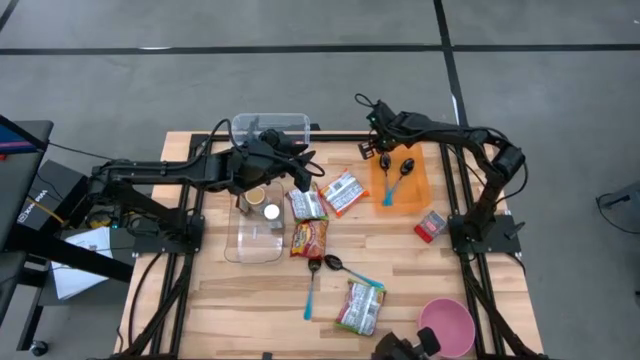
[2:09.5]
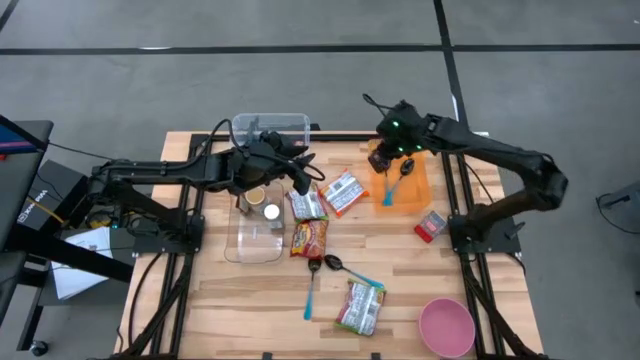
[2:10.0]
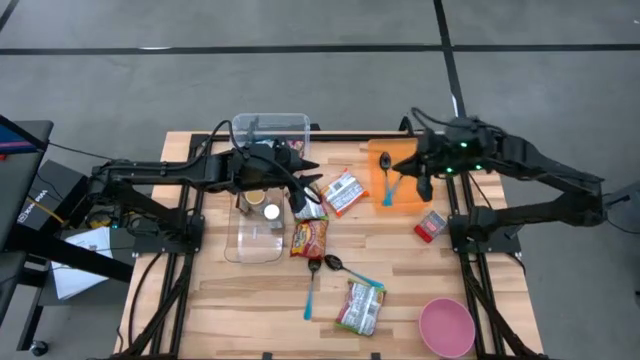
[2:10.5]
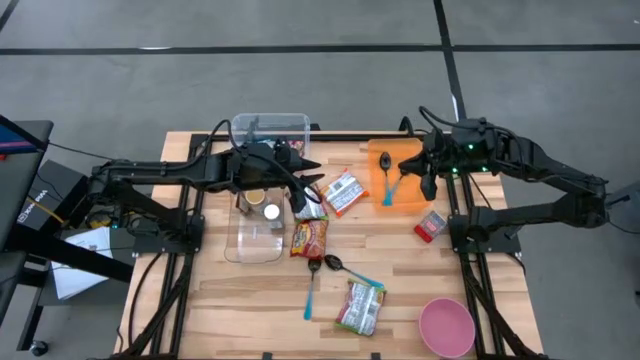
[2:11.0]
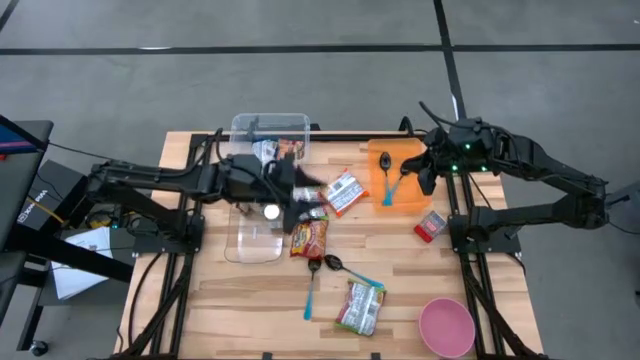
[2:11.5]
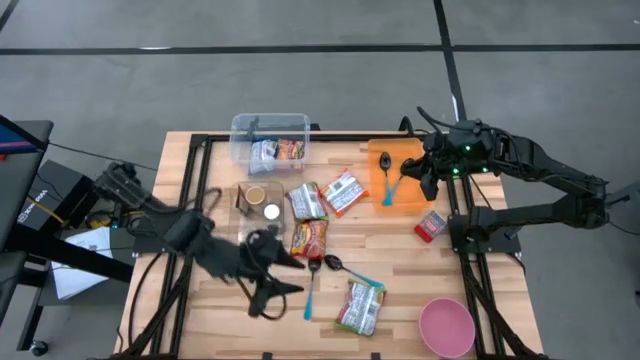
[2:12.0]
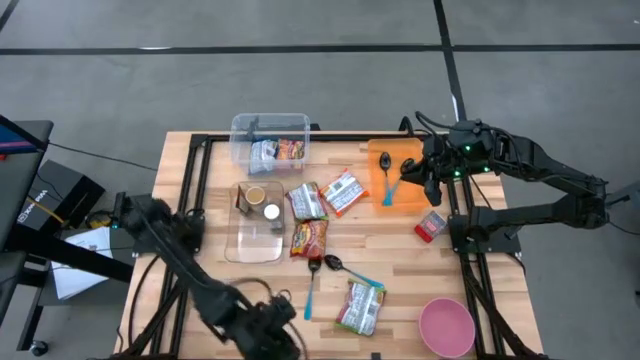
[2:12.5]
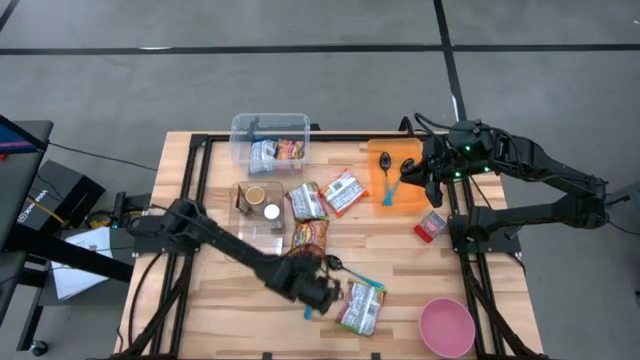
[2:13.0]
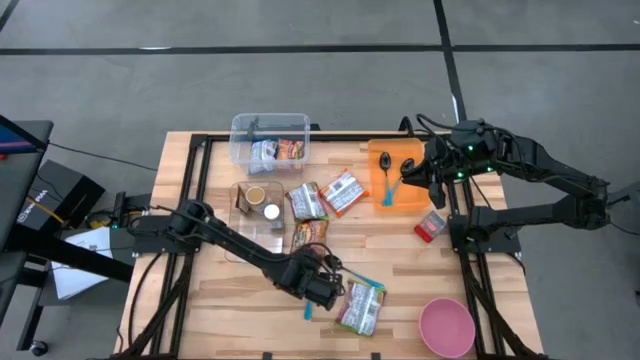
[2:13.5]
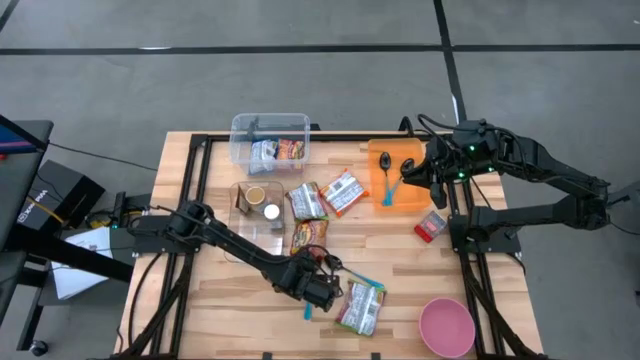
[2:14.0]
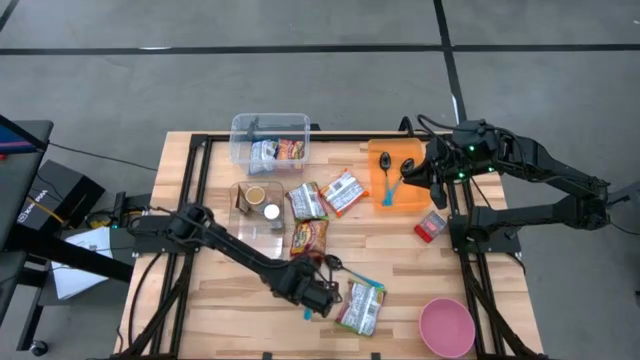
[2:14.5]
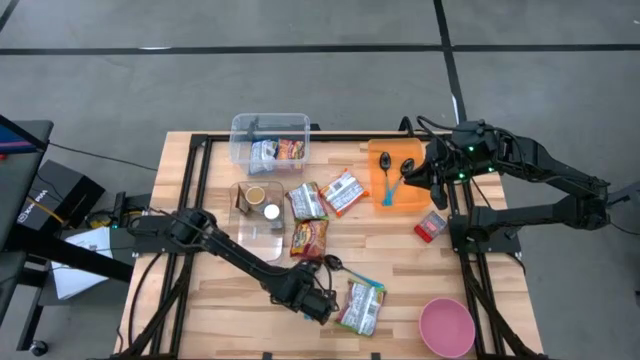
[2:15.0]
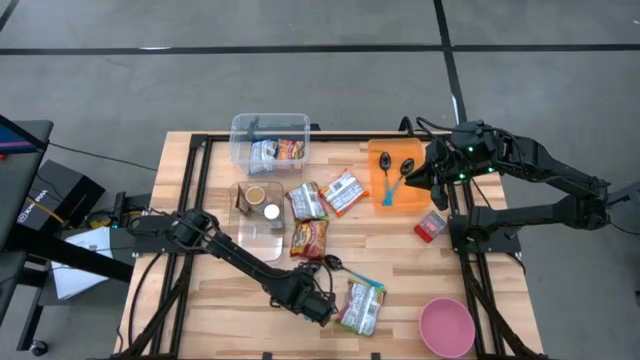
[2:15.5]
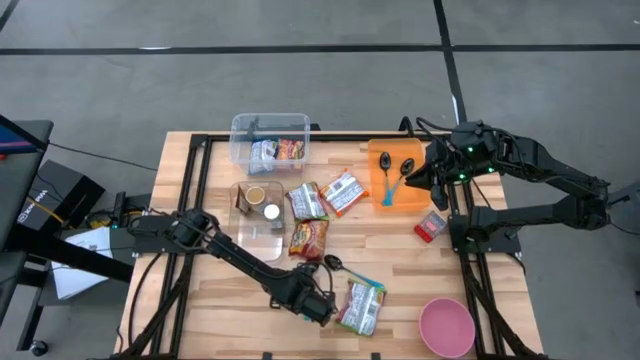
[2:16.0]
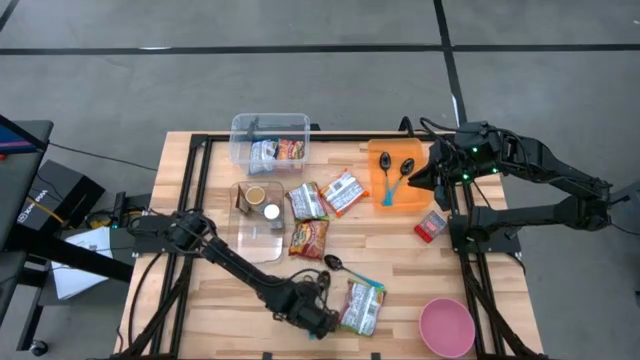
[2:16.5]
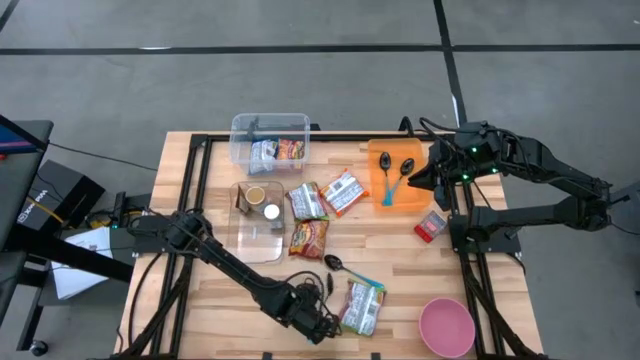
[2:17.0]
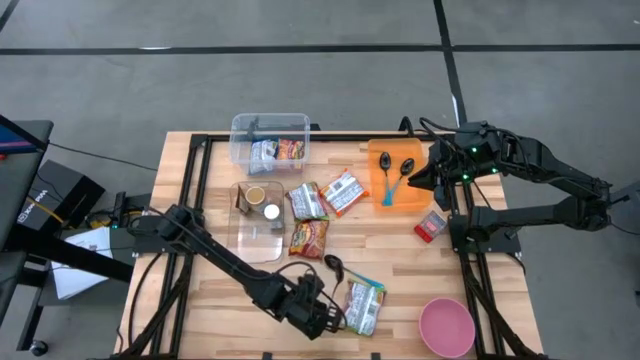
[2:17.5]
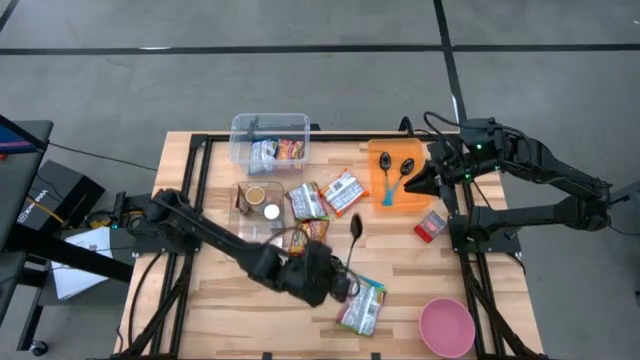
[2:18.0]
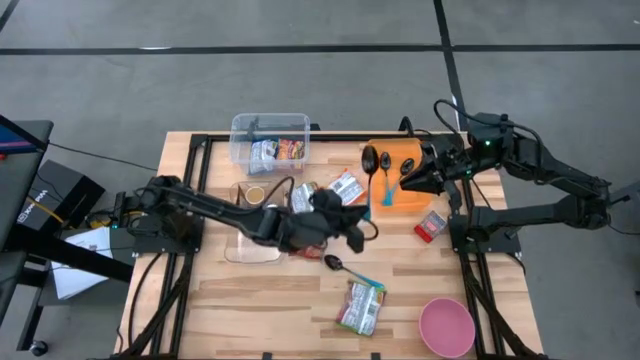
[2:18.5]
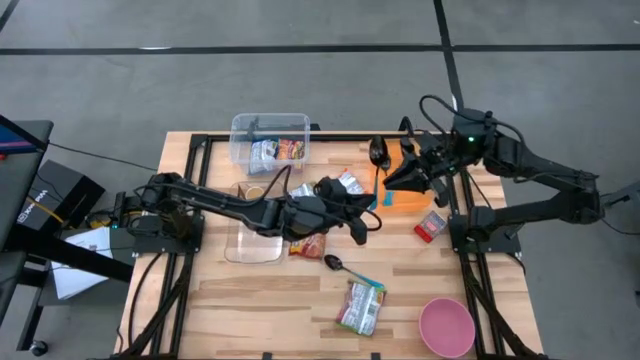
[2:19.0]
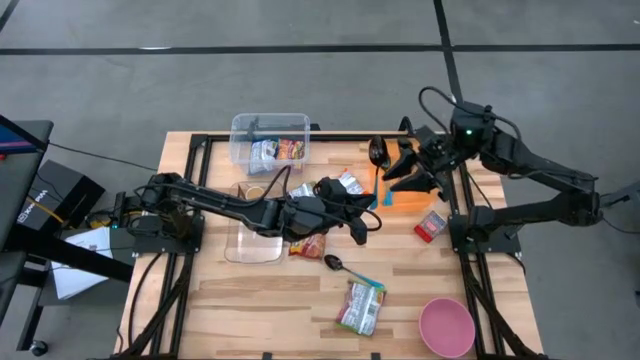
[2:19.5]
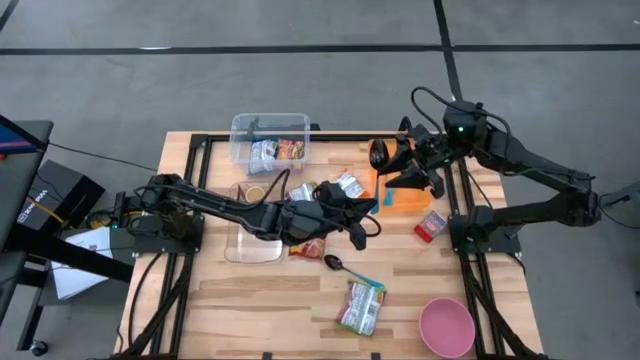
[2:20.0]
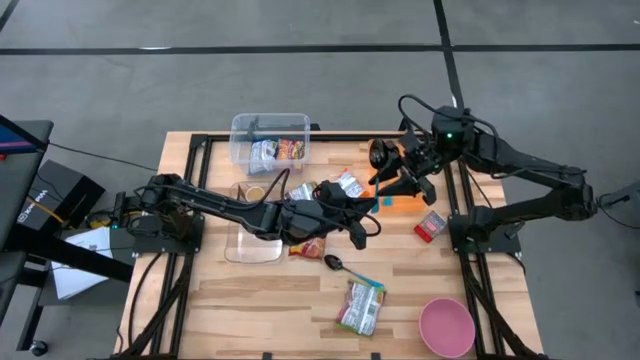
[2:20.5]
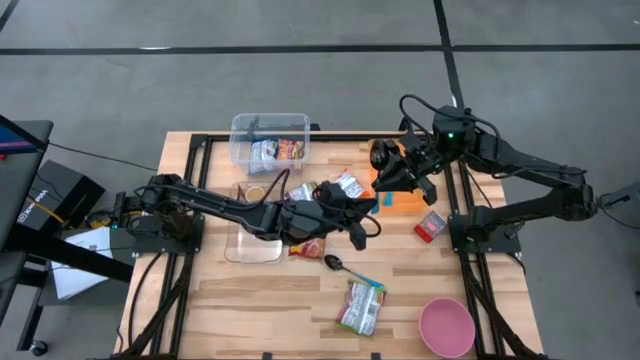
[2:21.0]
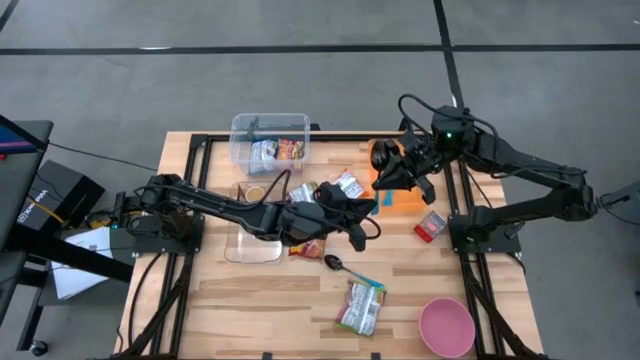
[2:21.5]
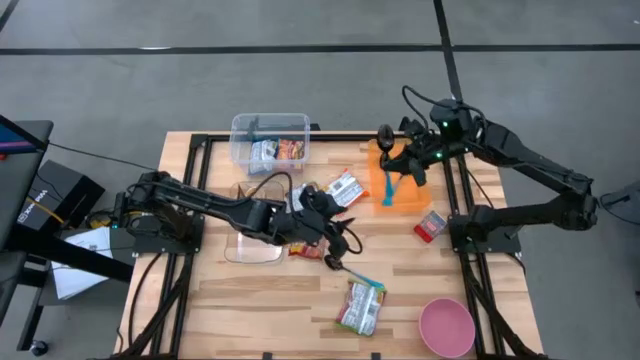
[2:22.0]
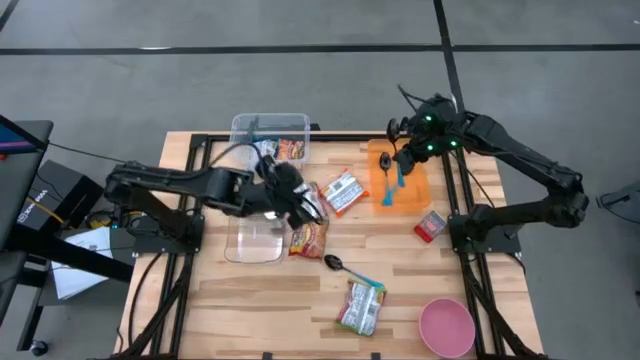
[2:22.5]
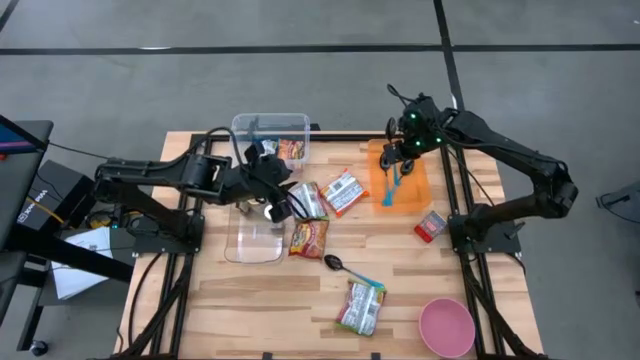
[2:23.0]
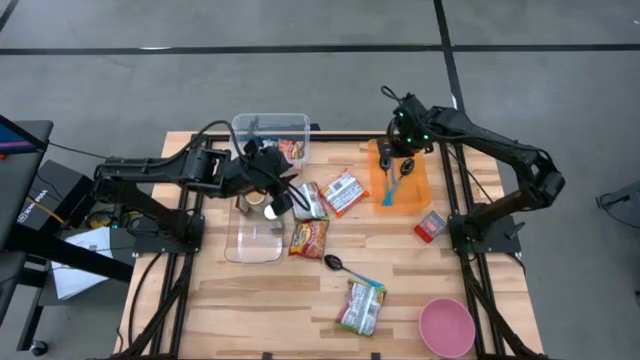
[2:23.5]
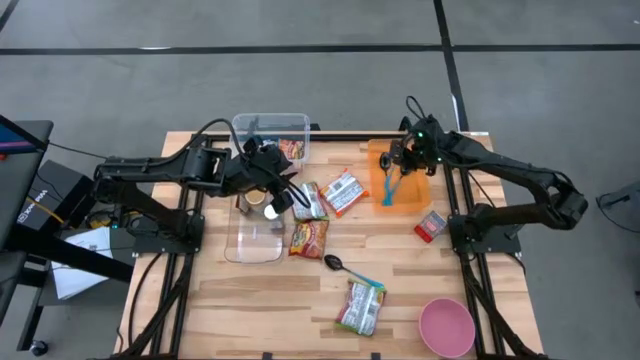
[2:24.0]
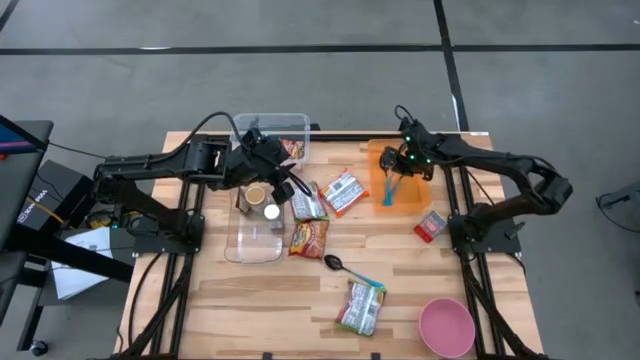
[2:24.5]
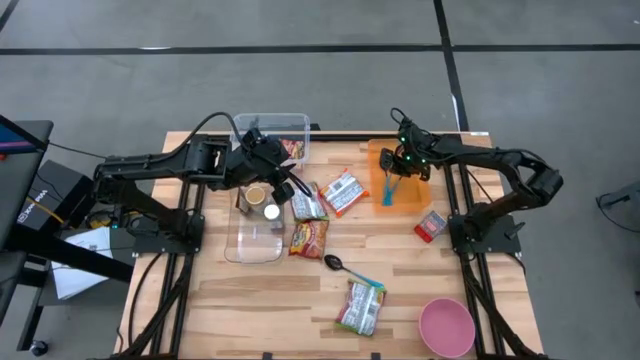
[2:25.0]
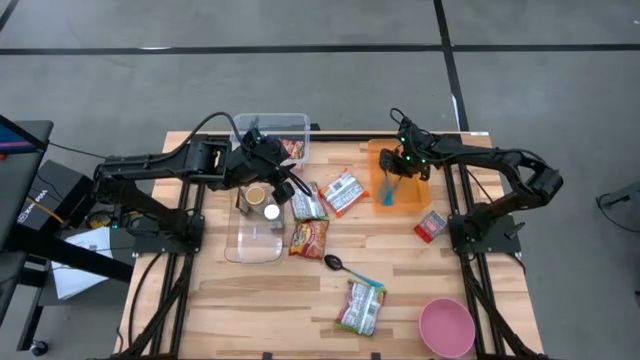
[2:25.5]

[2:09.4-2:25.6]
Task: Pick & Place Food Item
Put the blue spoon into the orange container
